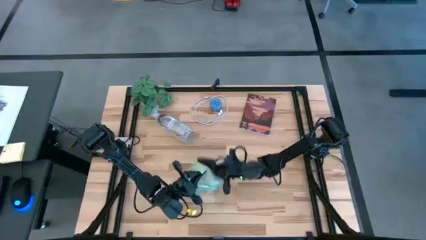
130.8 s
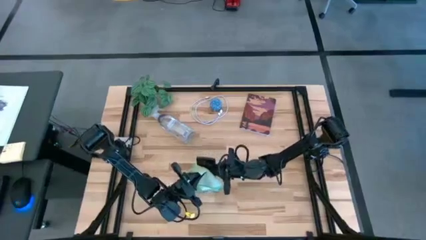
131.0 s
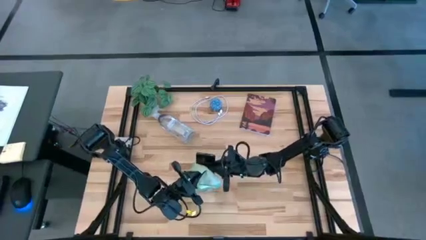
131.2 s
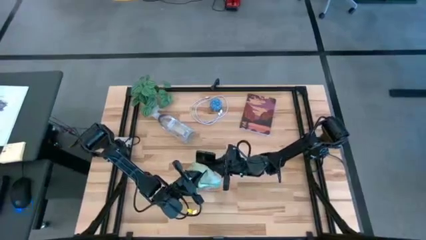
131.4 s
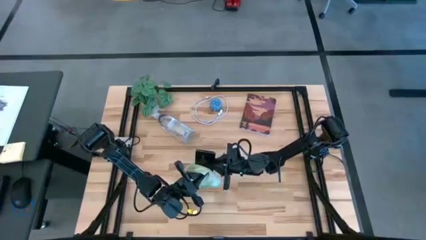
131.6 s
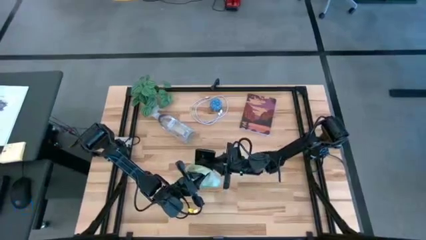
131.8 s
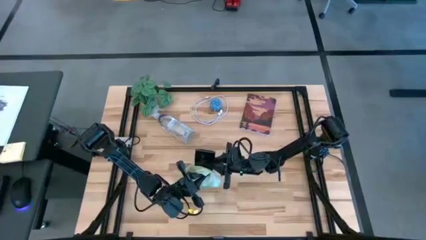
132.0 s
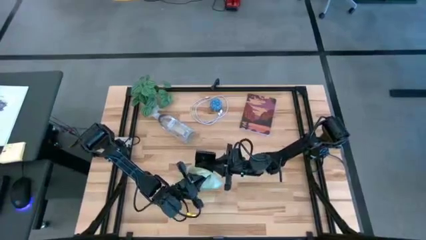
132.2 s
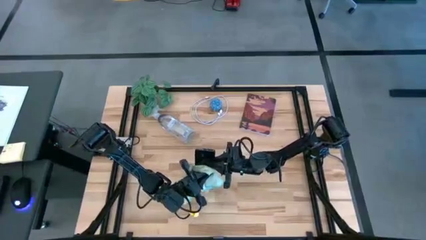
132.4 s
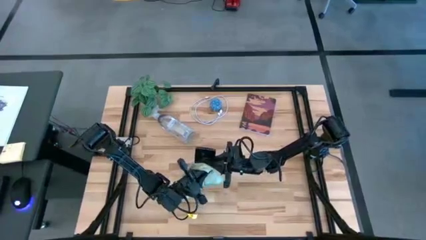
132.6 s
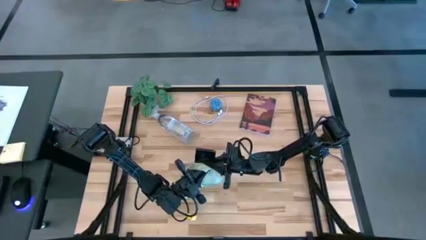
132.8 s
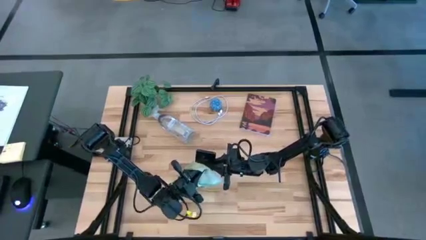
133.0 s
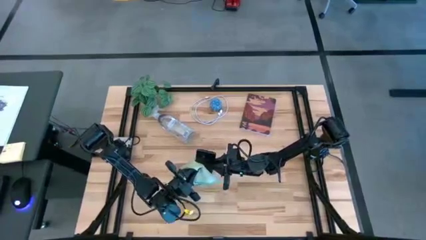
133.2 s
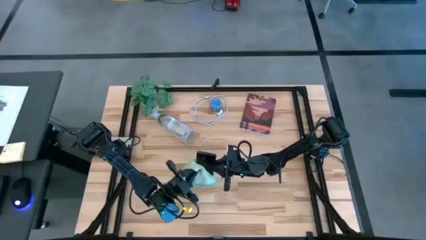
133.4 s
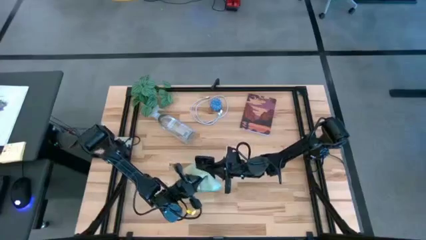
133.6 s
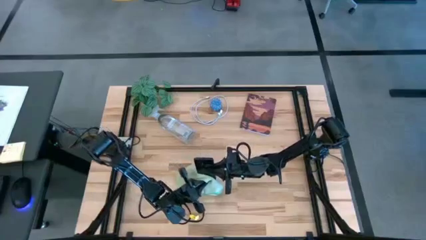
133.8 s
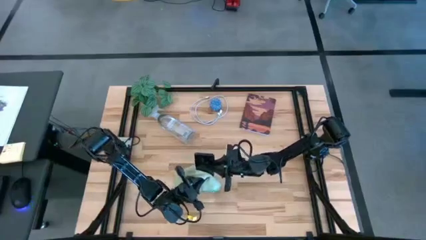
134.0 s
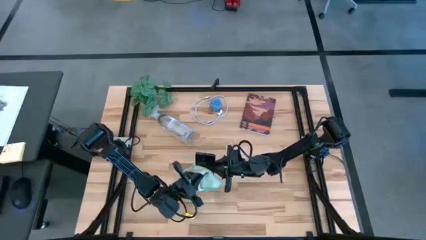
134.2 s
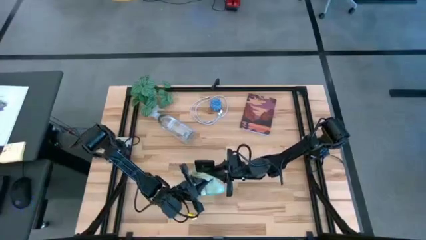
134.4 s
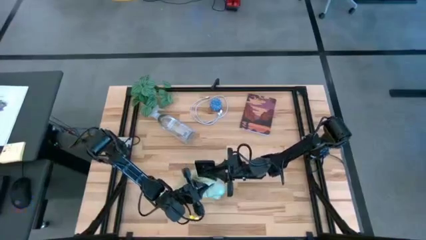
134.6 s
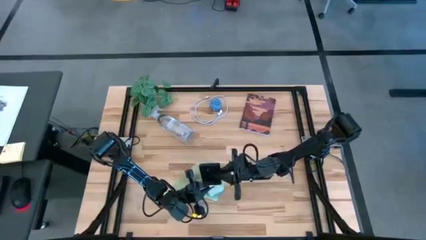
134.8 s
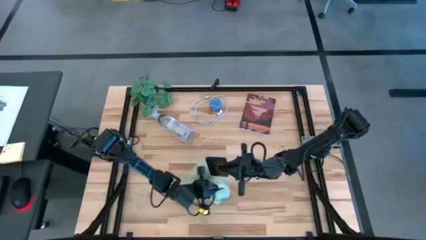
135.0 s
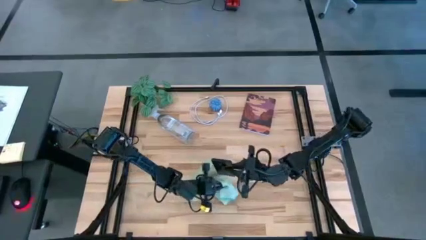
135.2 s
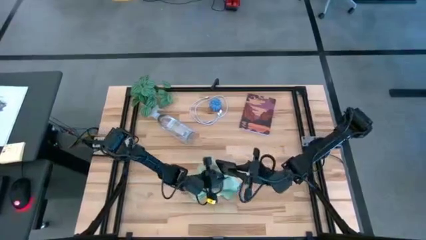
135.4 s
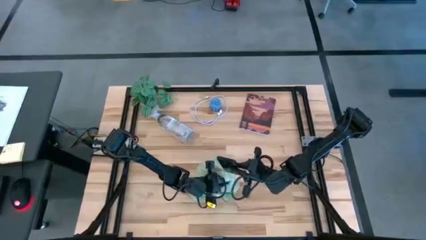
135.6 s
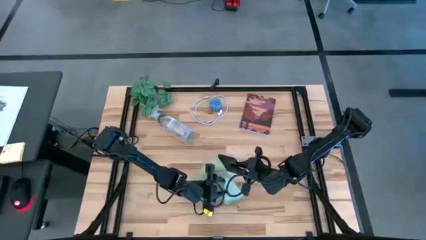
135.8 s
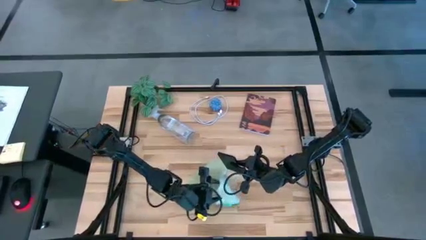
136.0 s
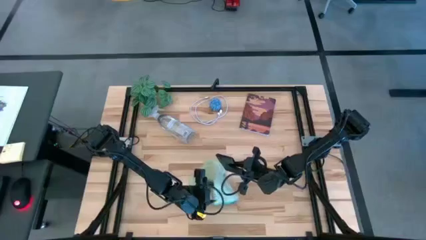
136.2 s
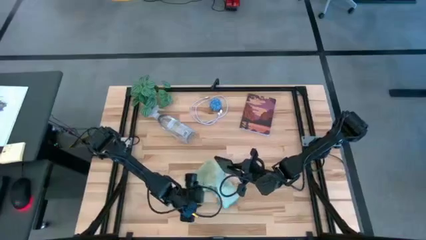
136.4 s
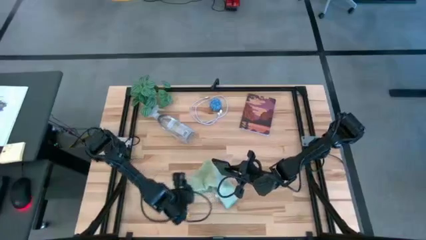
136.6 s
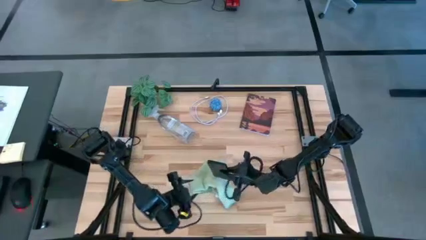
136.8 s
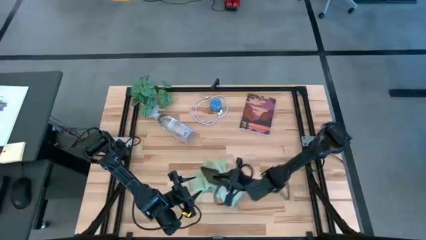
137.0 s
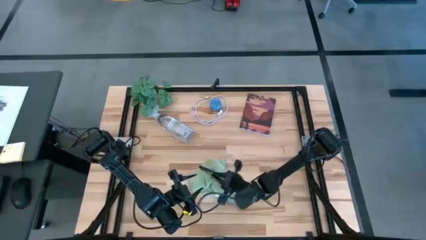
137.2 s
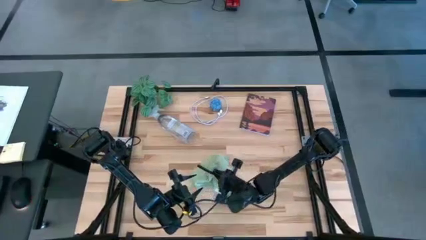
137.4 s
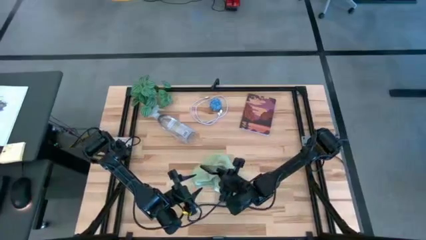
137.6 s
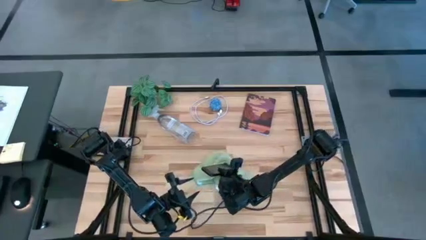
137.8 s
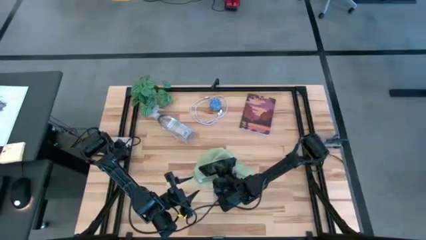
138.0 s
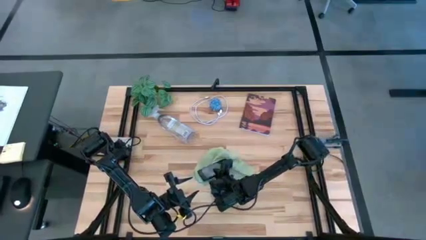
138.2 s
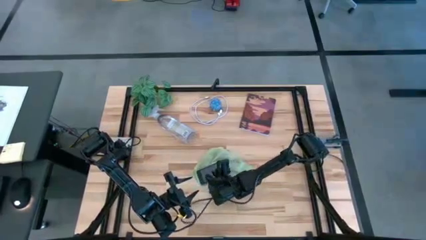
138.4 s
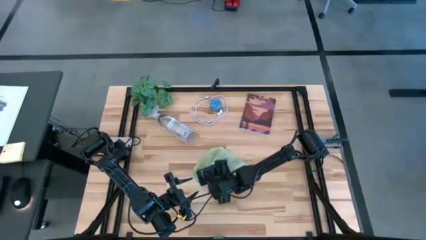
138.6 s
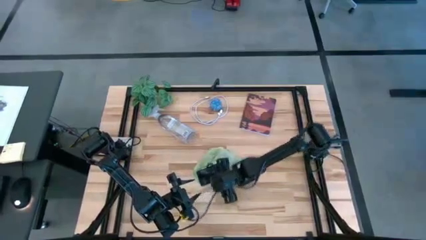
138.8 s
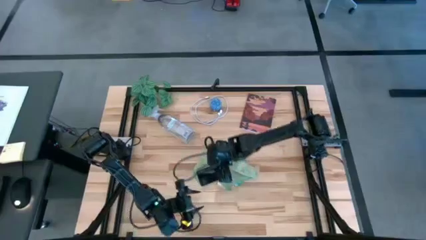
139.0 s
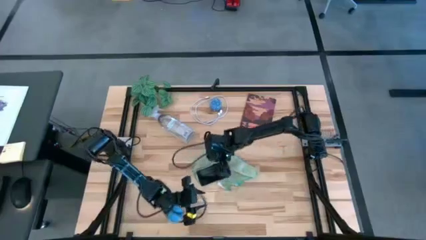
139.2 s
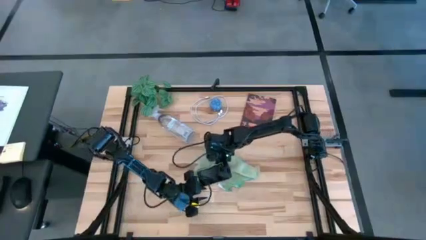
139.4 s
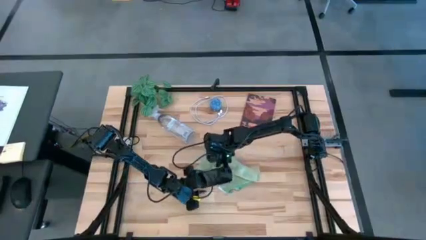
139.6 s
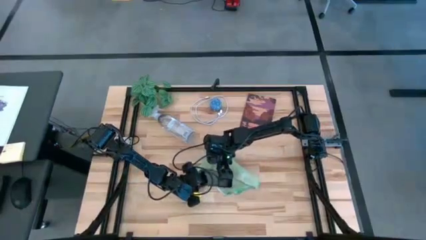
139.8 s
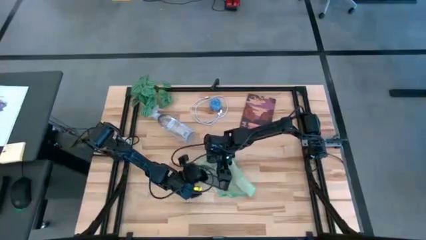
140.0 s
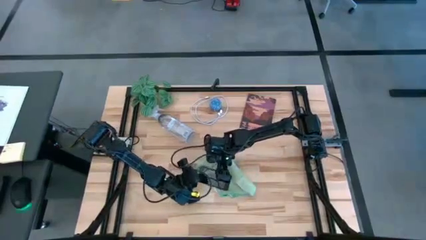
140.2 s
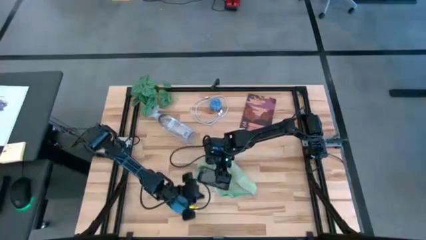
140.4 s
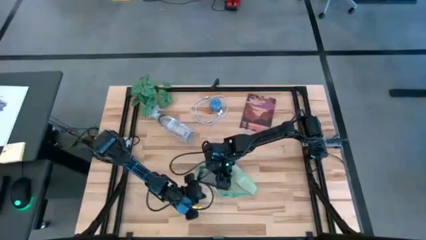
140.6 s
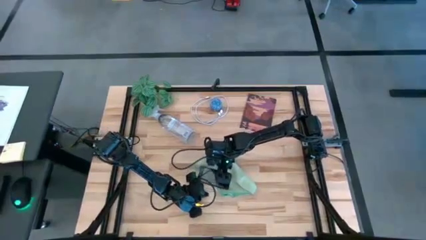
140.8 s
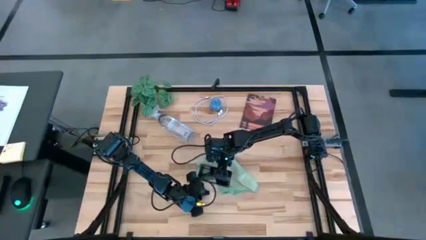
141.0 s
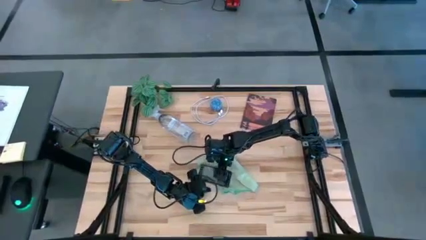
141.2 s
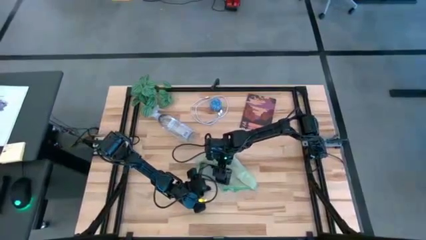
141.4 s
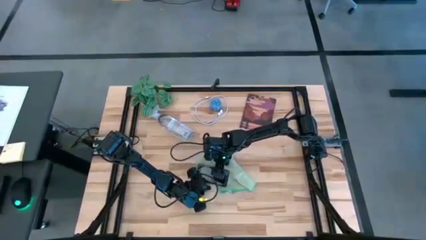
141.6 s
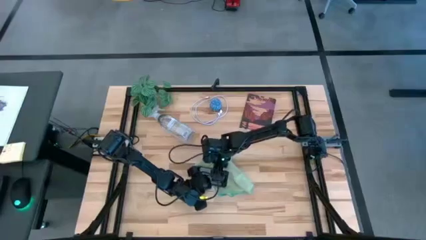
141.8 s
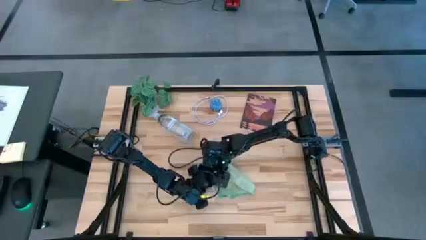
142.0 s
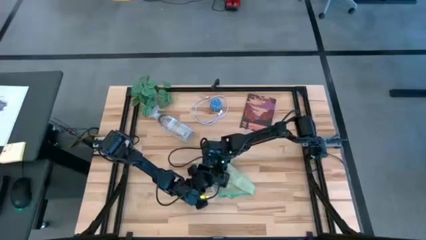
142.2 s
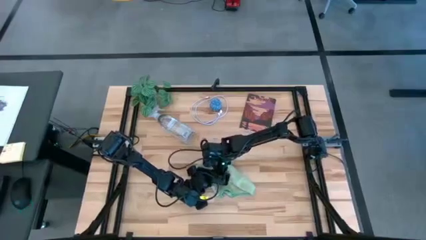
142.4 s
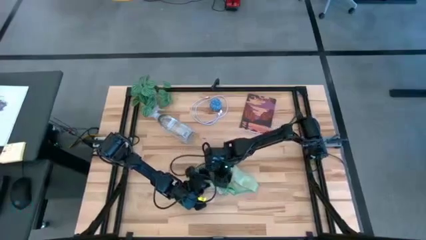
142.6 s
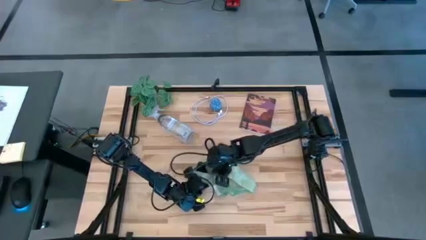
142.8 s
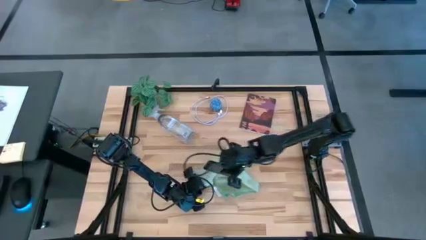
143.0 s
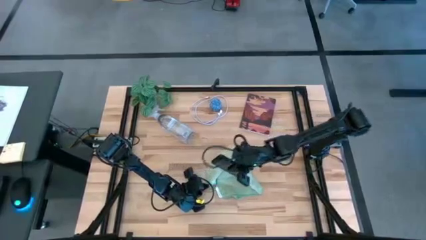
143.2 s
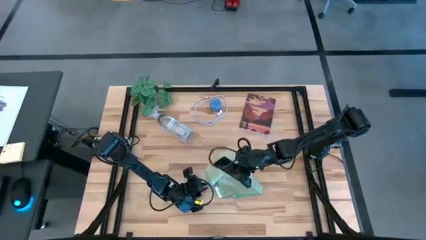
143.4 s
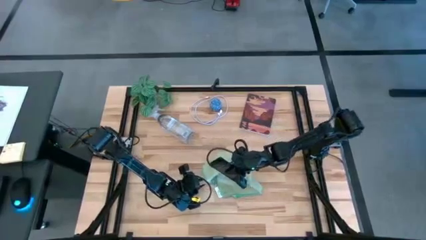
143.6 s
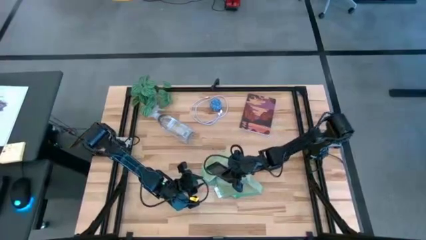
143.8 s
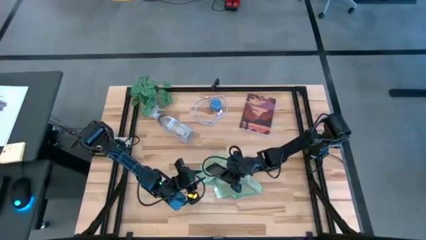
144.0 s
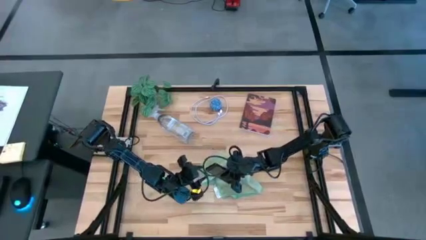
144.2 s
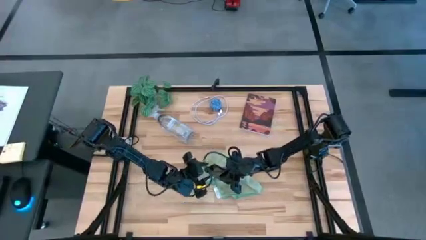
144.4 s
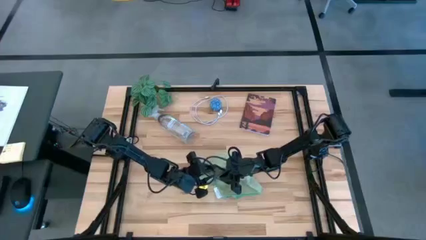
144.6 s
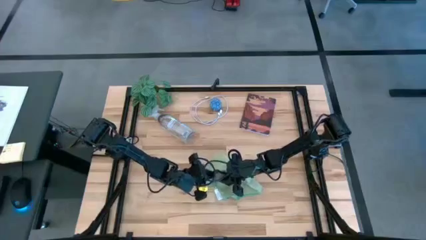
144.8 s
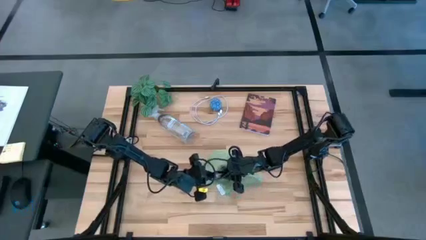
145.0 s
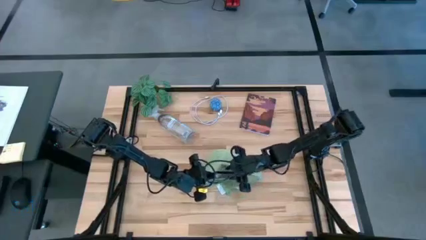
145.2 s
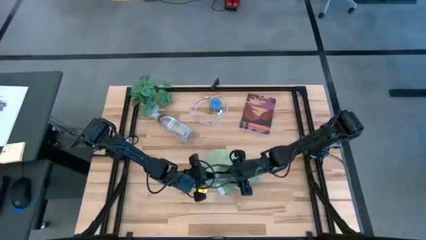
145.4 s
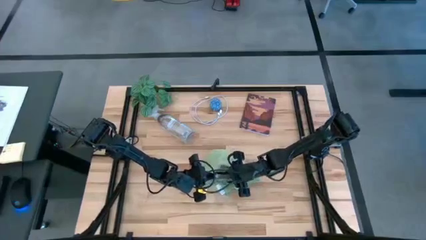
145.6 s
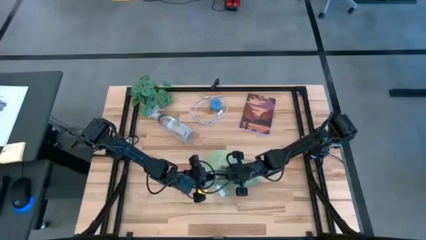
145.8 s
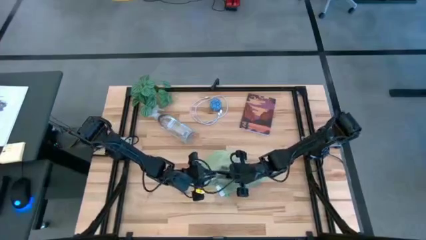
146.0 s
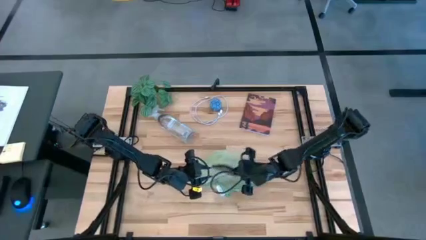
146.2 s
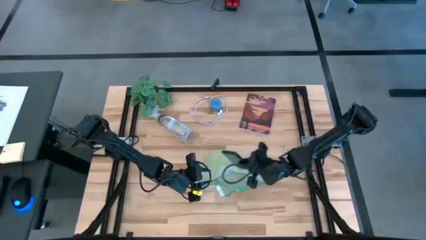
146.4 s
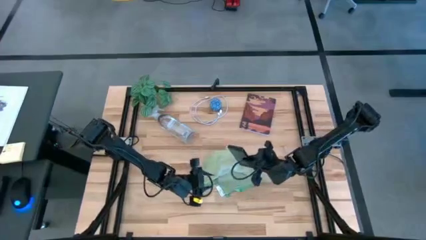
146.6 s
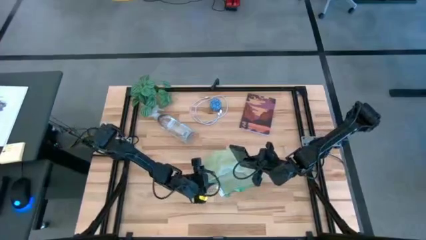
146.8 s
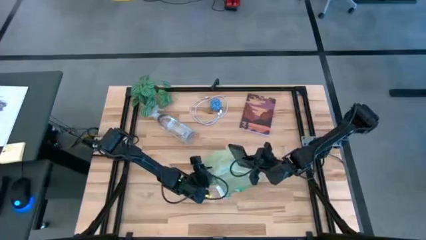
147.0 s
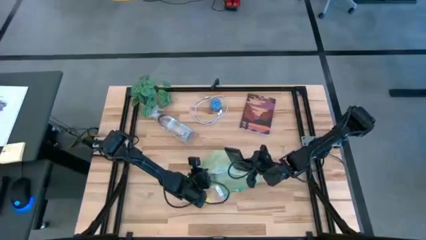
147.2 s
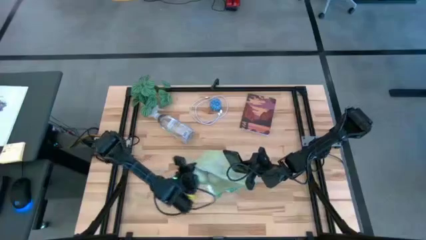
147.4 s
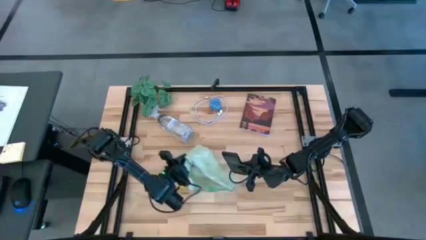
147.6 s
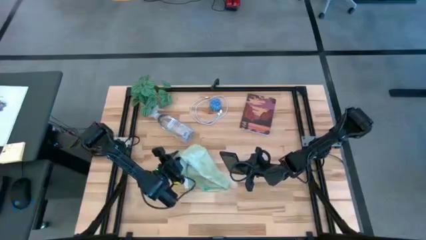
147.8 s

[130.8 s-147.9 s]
Task: Apply microfiber cloth
Wipe the back and front of the black cellphone with the green microfiber cloth
